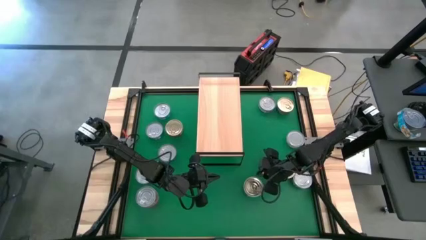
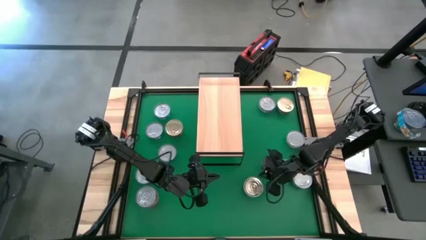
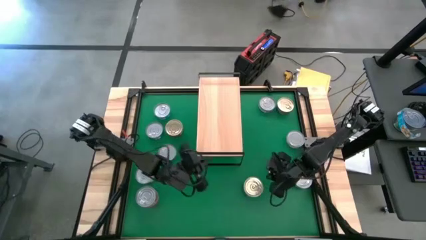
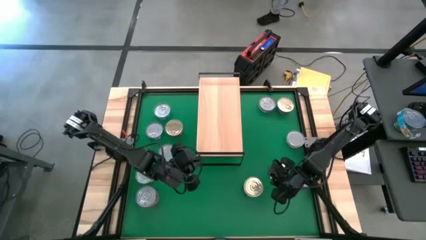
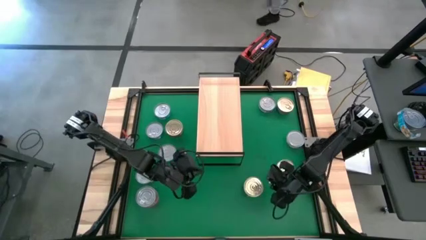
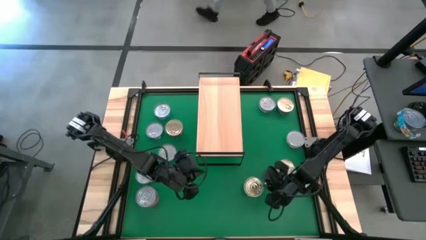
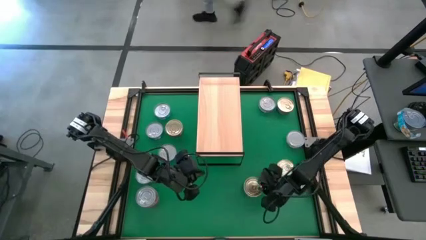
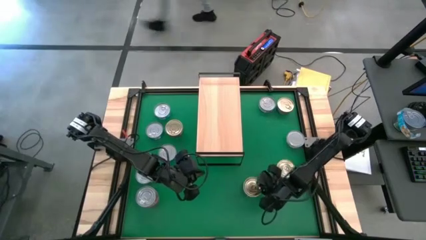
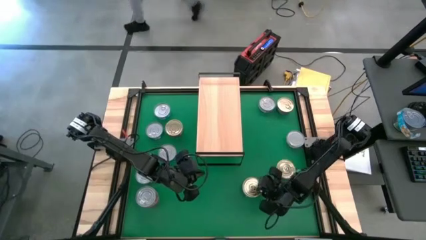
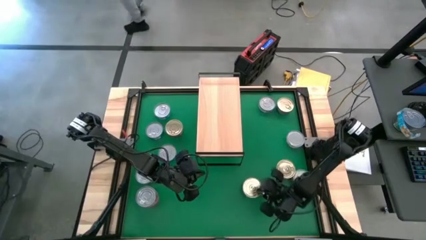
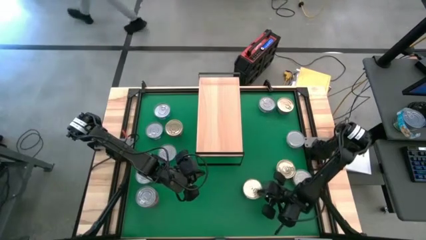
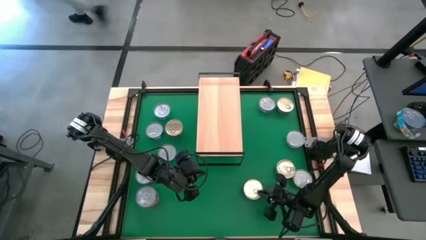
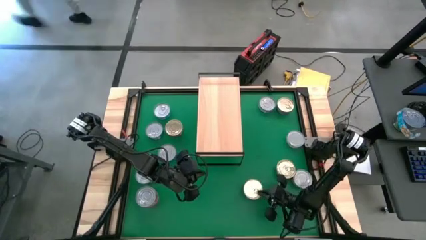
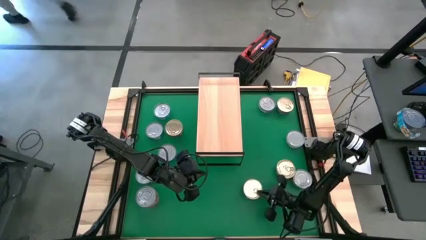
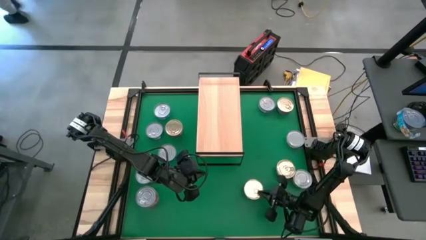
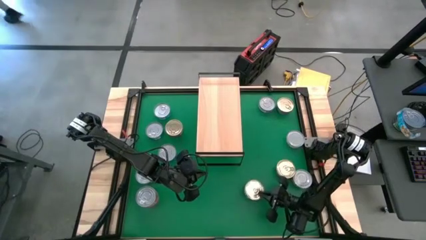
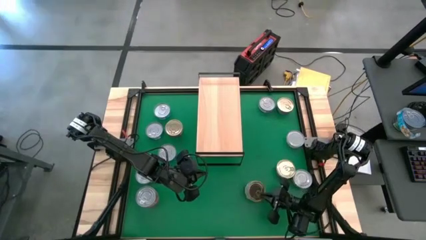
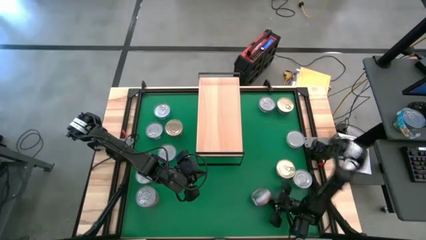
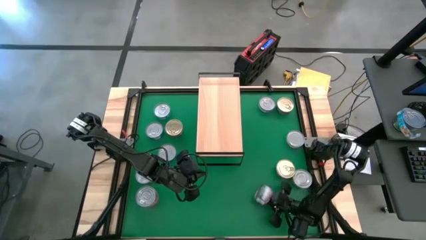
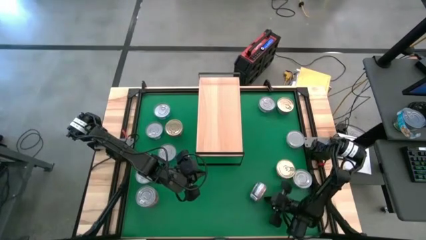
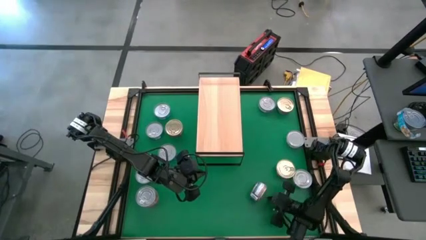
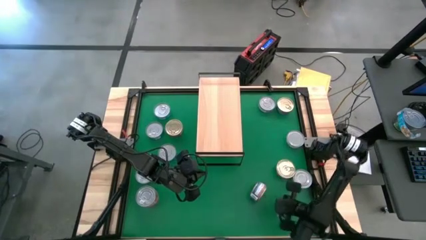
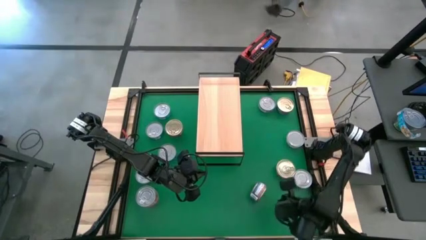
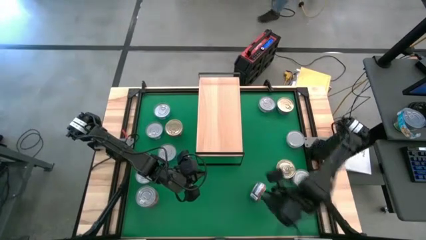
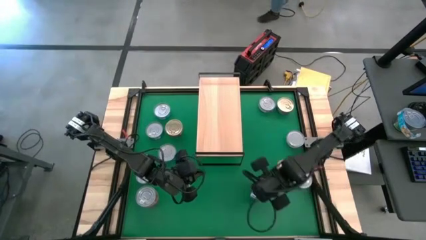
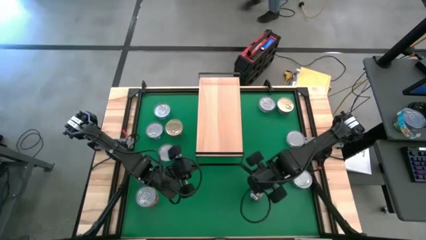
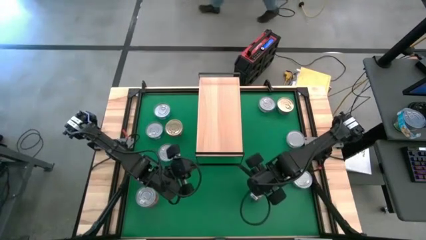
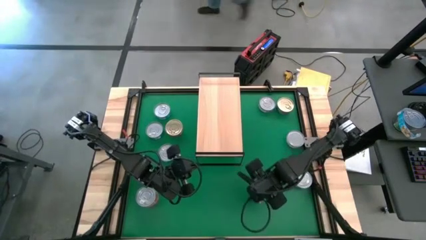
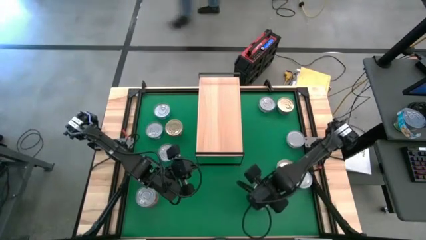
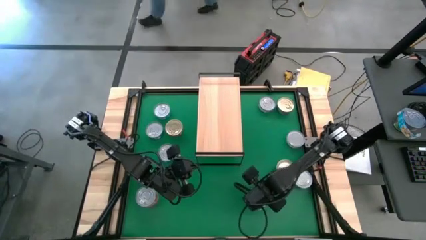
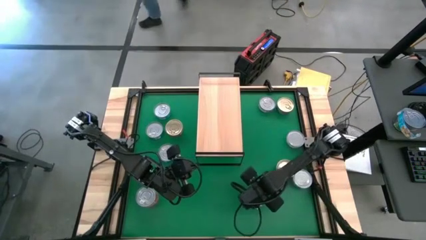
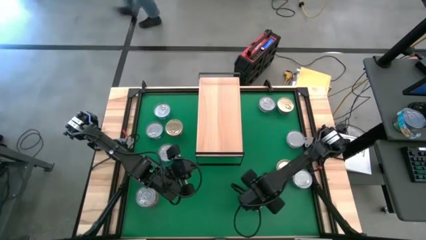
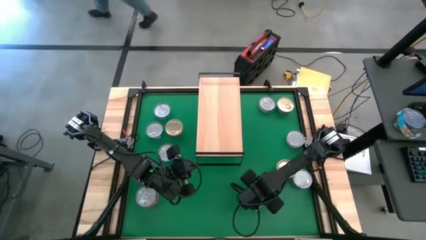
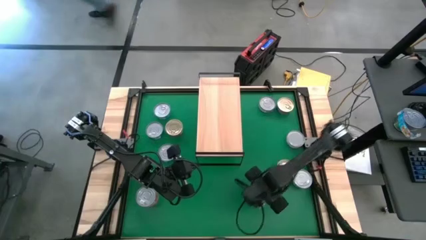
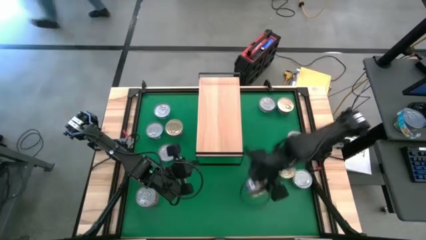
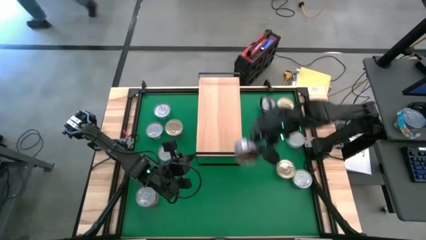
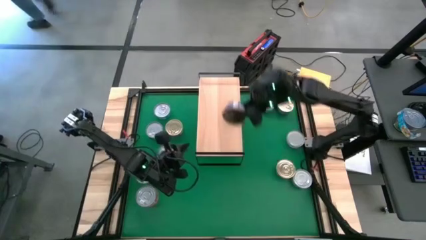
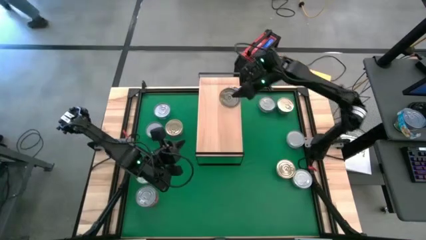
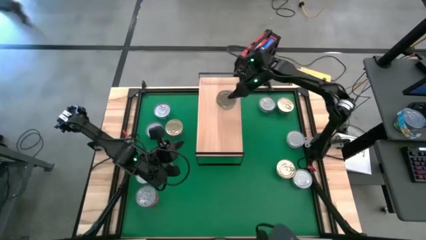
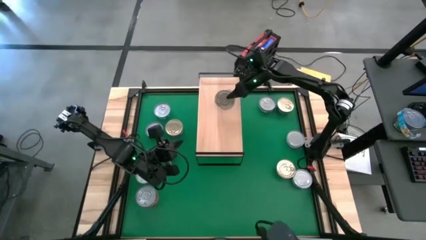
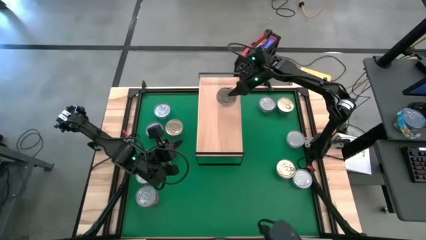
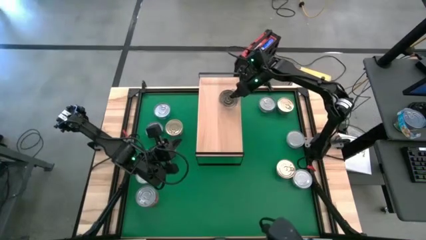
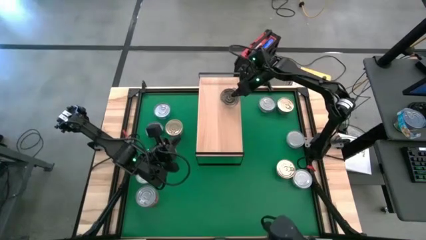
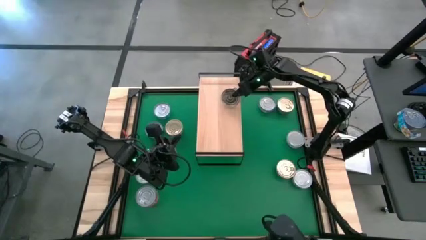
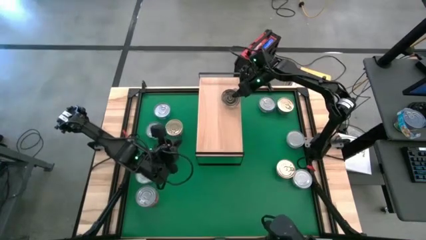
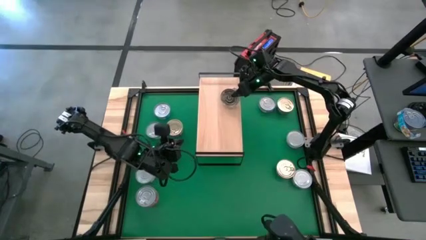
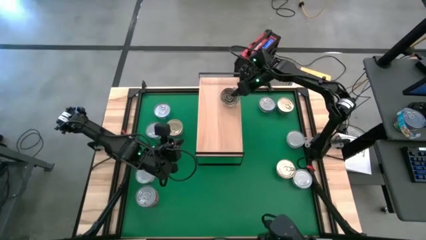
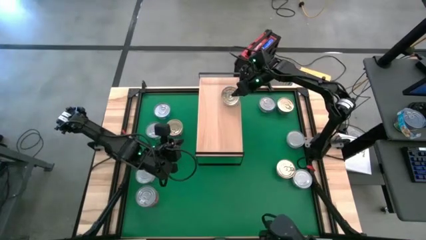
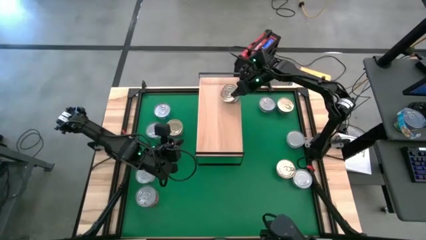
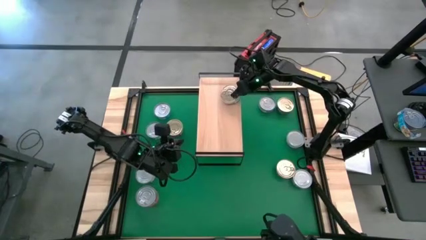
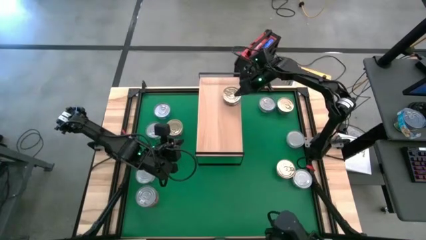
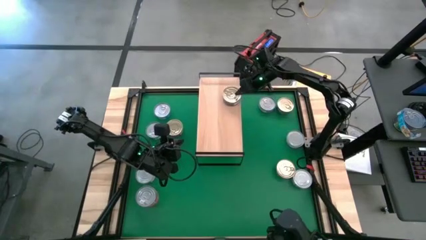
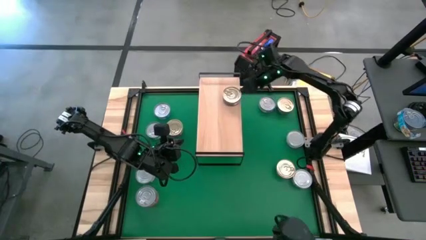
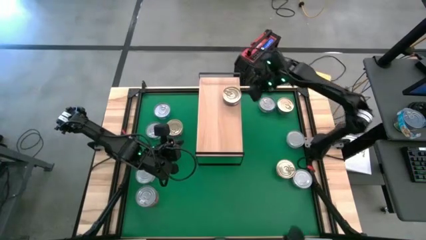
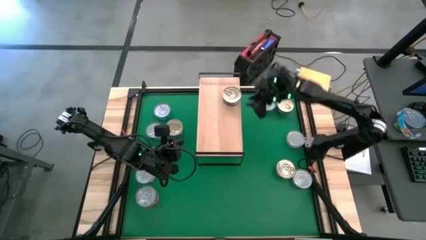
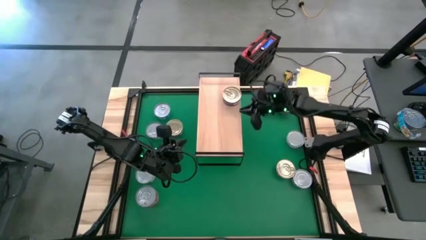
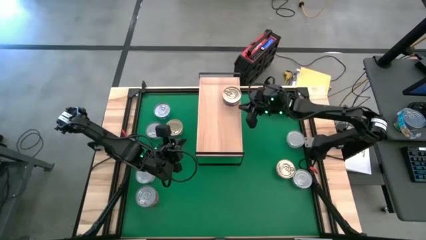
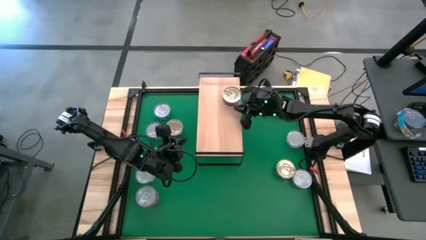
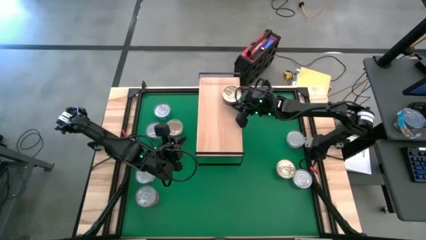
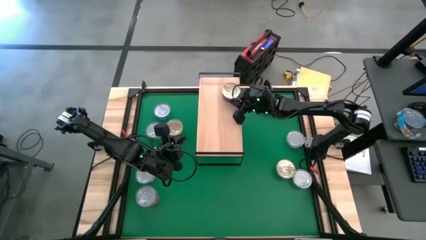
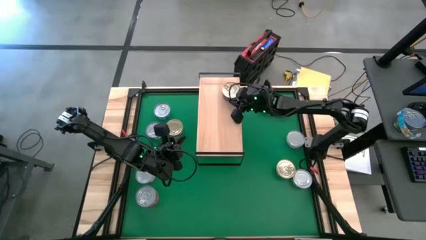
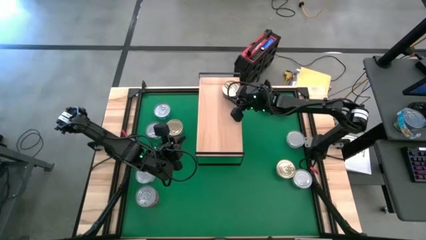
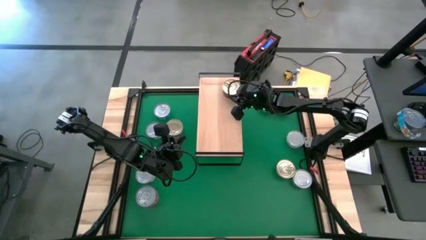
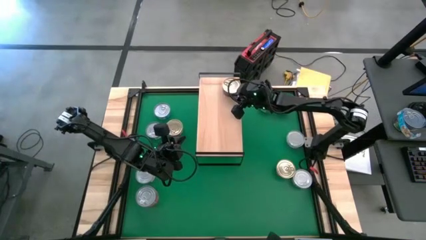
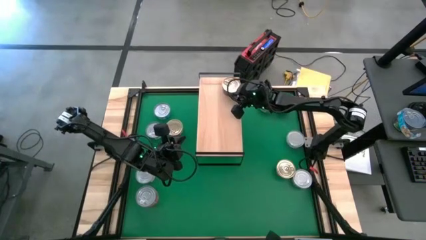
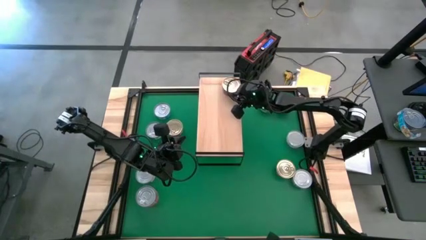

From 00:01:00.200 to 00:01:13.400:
Task: Stack canned seafood by type on shelf
Put the bottom center dark blue tuna can on the shelf
